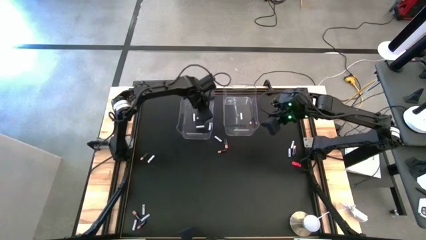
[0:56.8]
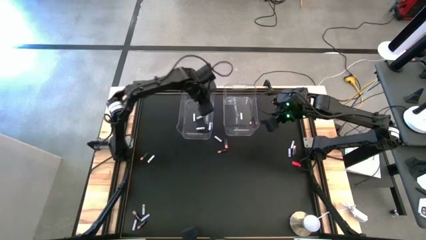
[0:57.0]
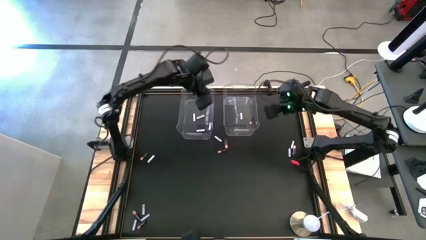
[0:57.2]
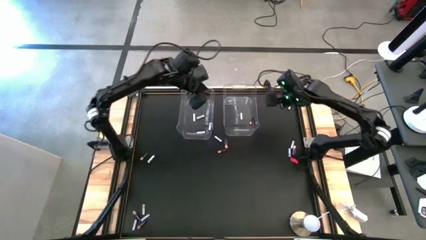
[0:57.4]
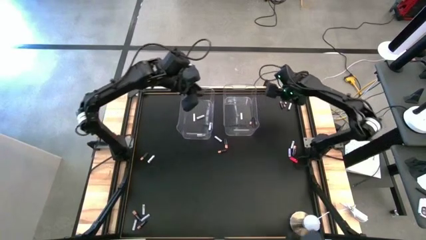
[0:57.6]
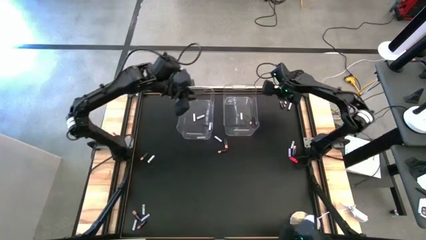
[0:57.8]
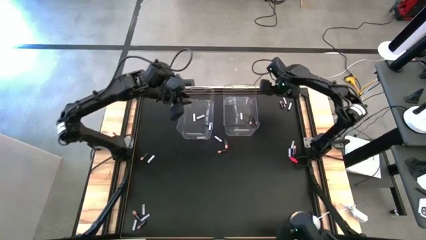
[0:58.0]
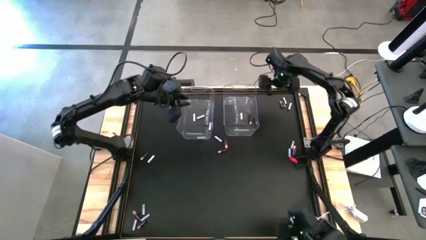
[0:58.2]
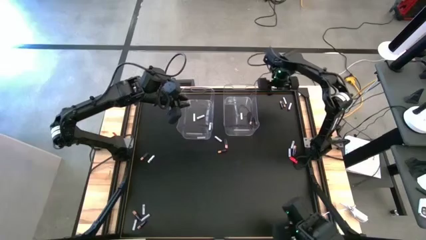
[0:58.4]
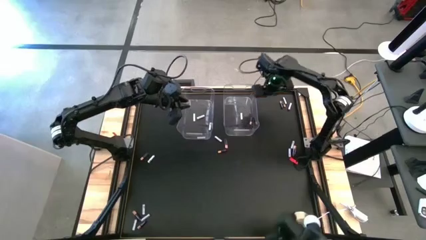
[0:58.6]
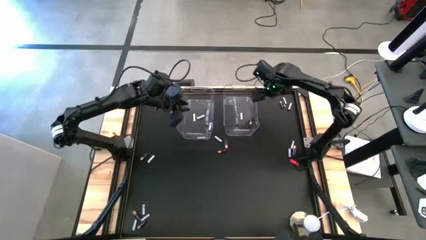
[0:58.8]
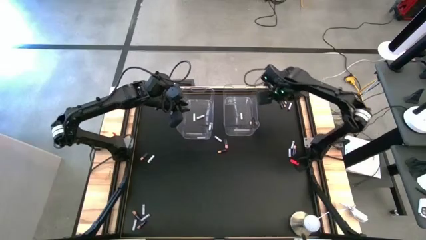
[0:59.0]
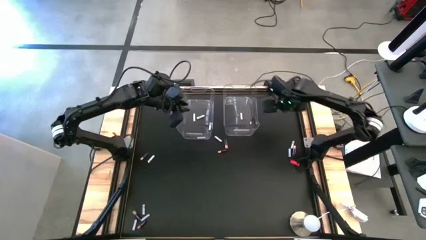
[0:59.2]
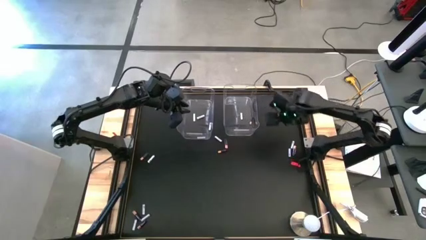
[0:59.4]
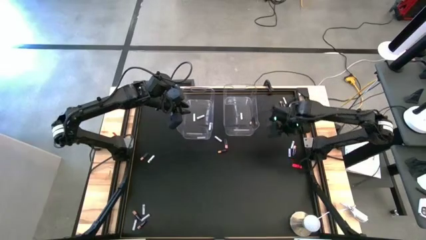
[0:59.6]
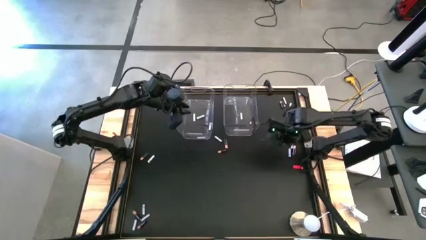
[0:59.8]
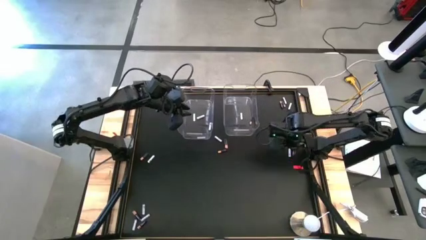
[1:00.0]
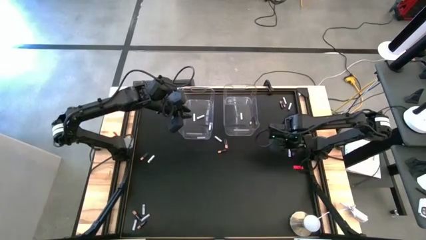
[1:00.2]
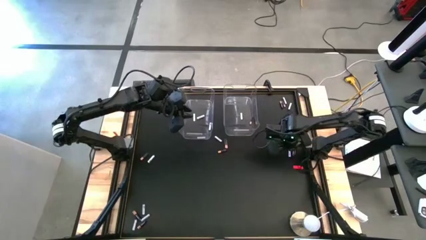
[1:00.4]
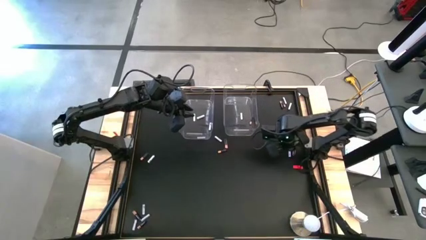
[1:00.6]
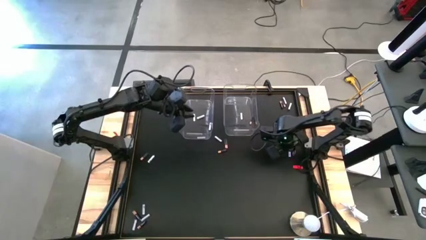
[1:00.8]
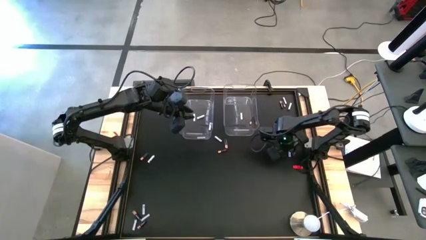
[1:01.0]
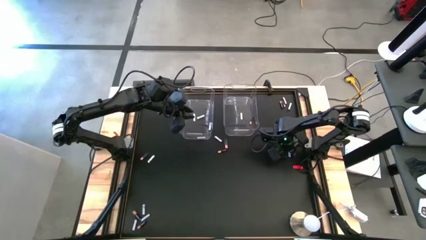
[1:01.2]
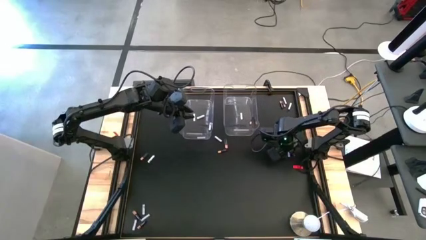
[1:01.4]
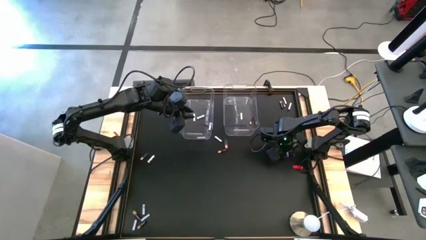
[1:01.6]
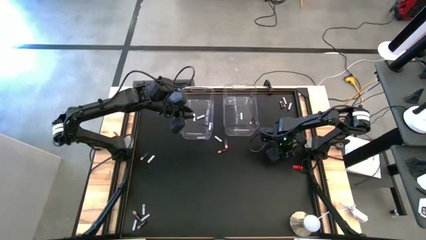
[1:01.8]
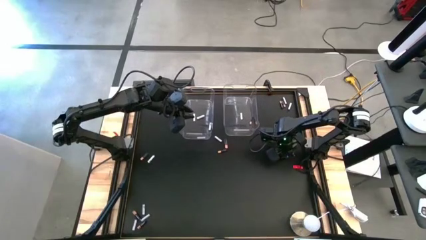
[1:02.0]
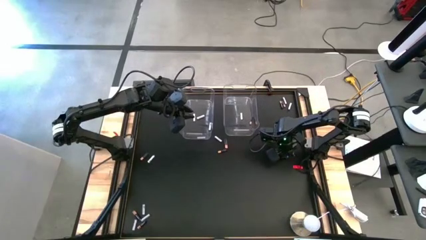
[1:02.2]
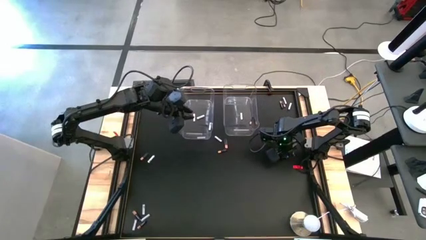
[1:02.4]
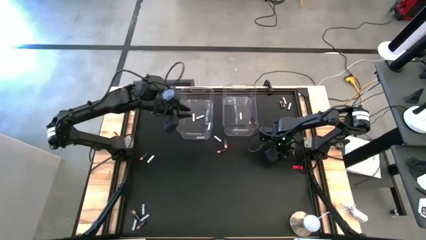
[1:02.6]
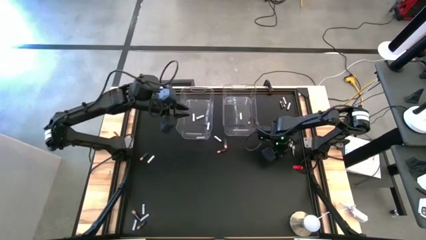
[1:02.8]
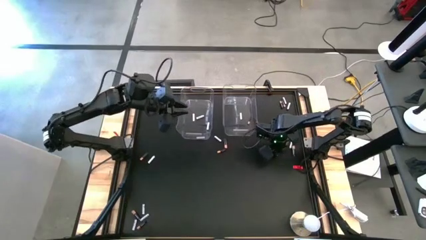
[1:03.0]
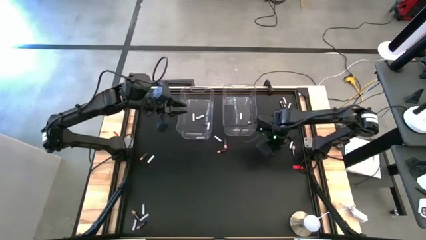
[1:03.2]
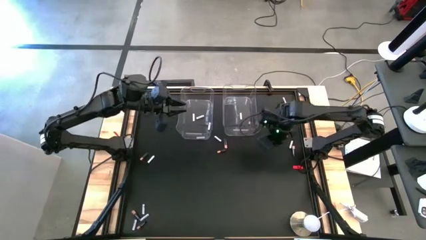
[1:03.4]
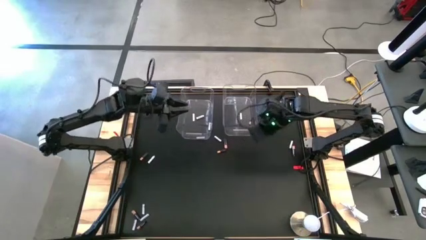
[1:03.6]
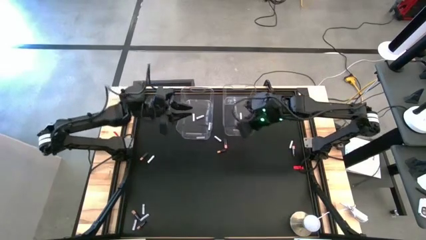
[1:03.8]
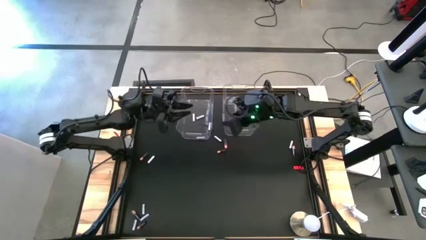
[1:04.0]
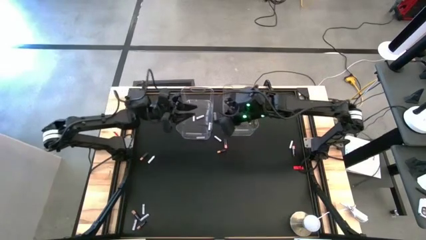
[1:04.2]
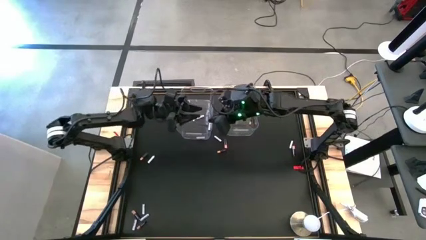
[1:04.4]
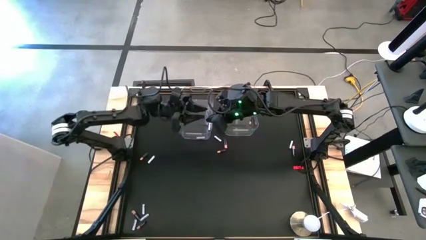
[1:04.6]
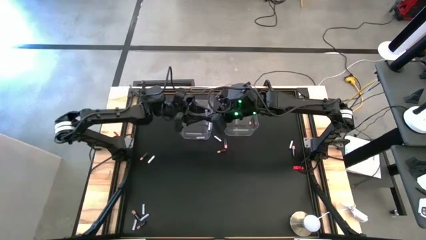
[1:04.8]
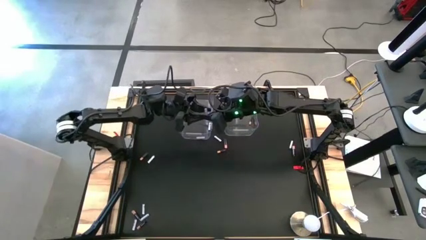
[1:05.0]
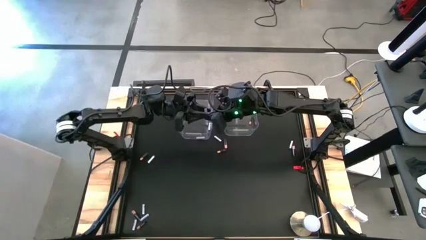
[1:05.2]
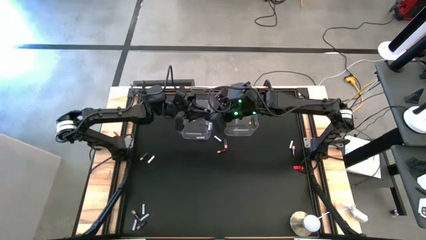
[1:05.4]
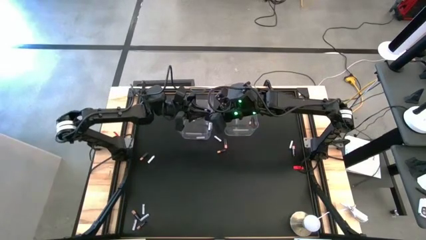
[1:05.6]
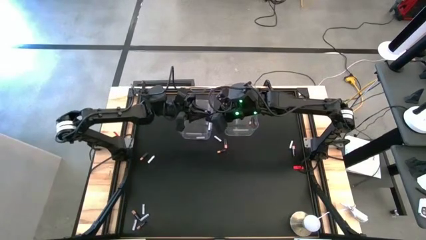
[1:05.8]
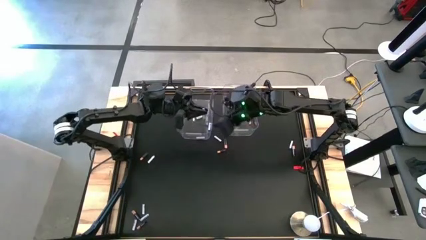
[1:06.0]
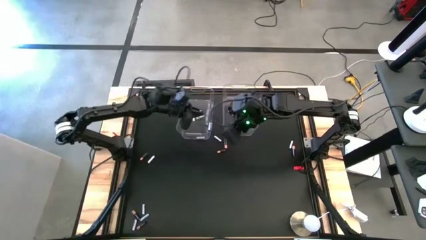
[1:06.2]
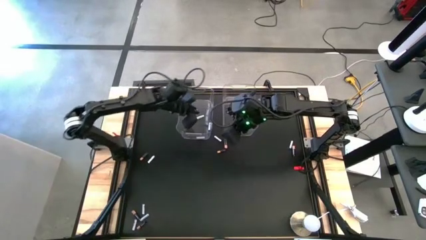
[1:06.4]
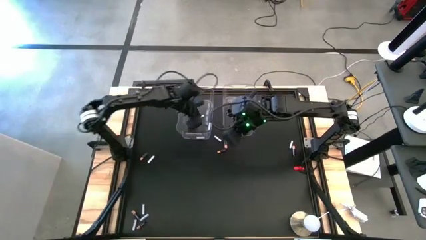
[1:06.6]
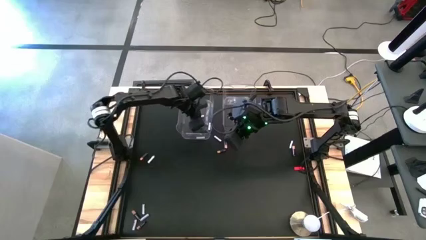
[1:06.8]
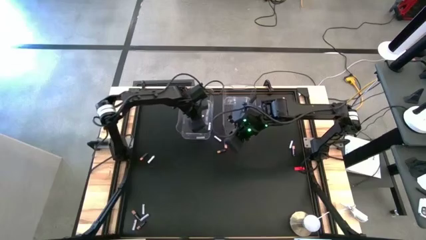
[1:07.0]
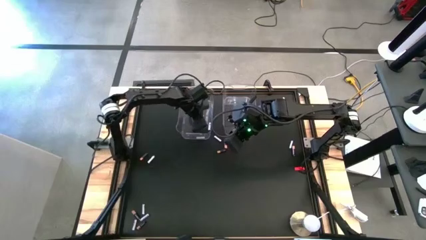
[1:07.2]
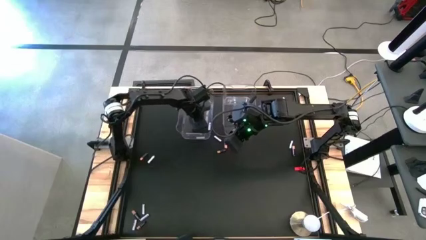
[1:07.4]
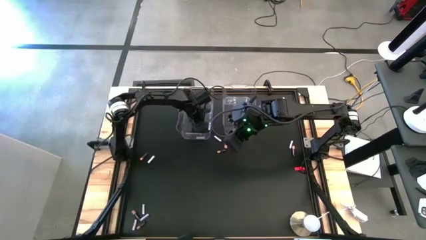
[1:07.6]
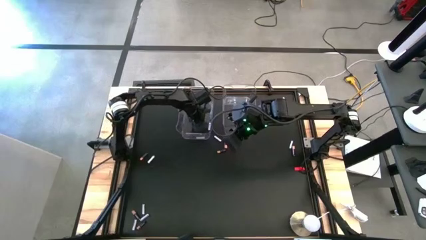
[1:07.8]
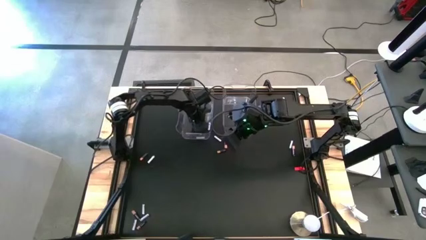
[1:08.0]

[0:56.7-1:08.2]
Task: Sort batteries
Put the white battery into the left transparent bin

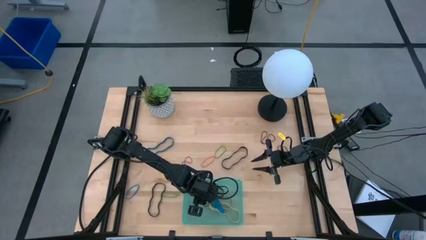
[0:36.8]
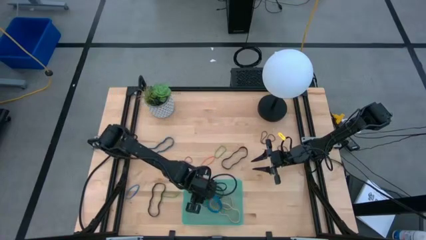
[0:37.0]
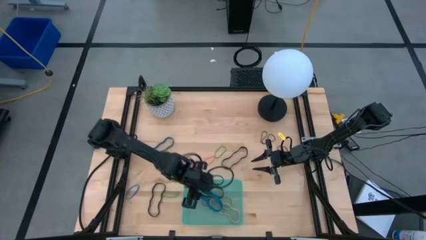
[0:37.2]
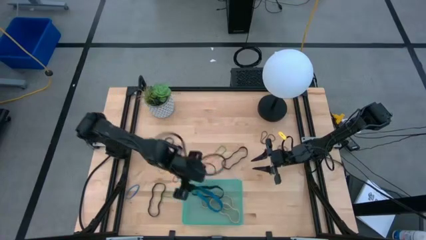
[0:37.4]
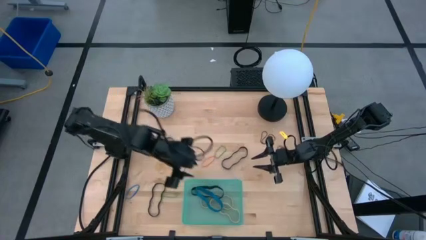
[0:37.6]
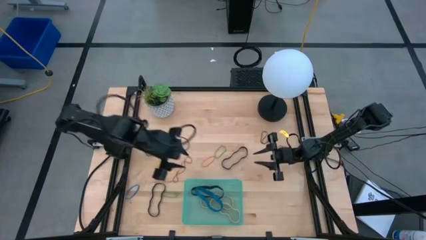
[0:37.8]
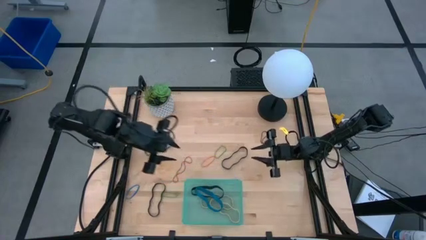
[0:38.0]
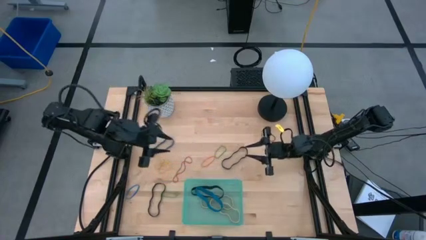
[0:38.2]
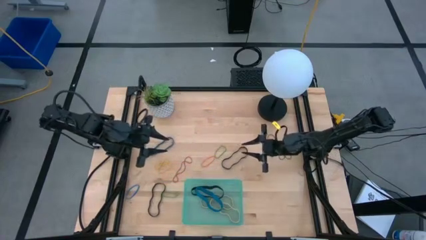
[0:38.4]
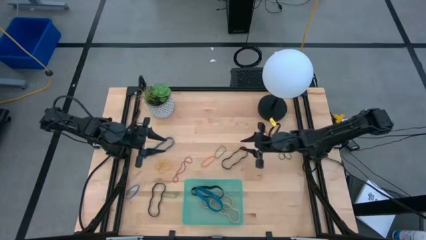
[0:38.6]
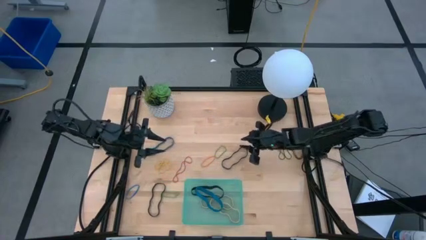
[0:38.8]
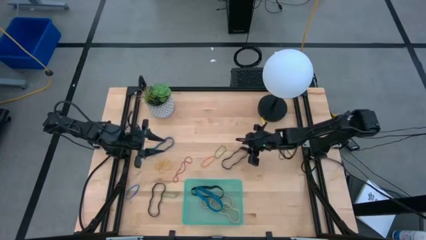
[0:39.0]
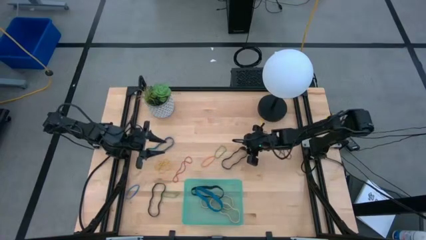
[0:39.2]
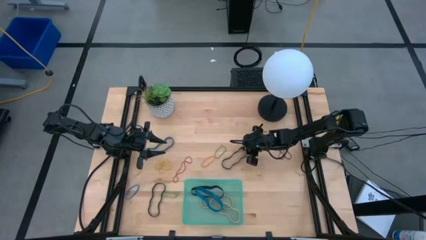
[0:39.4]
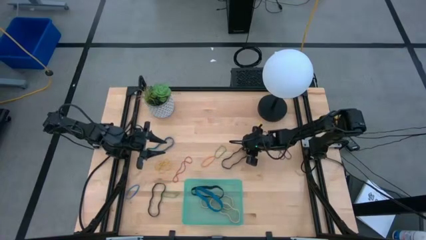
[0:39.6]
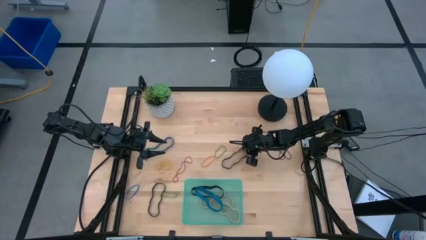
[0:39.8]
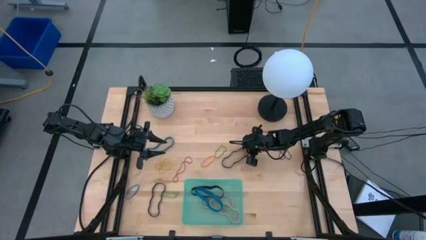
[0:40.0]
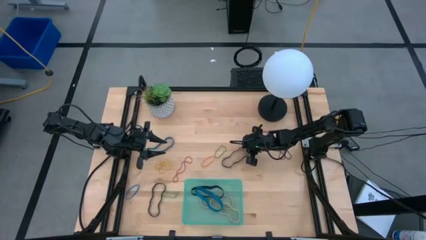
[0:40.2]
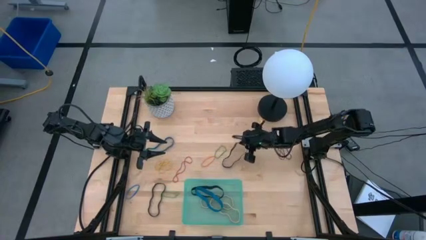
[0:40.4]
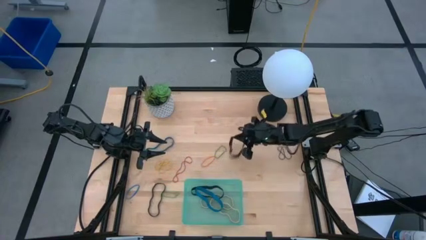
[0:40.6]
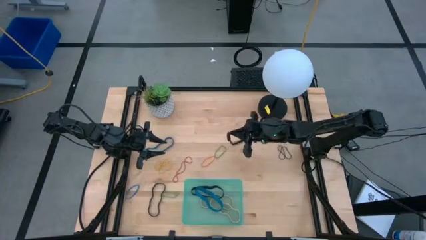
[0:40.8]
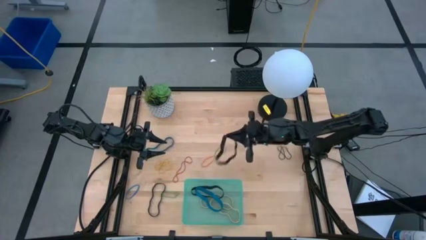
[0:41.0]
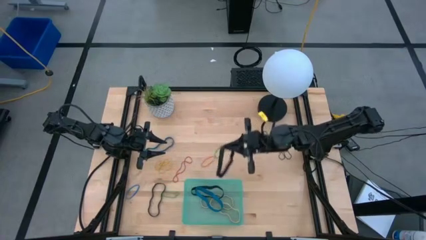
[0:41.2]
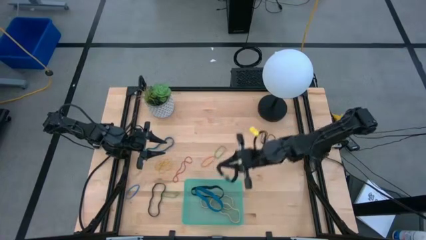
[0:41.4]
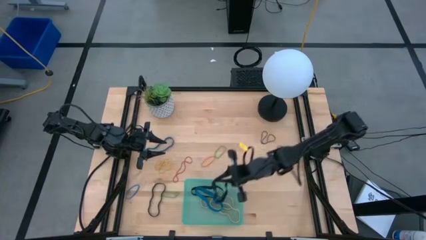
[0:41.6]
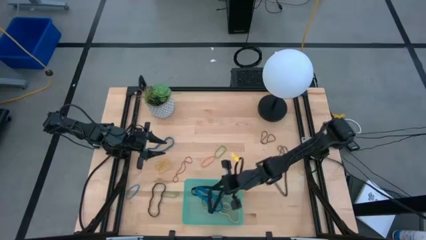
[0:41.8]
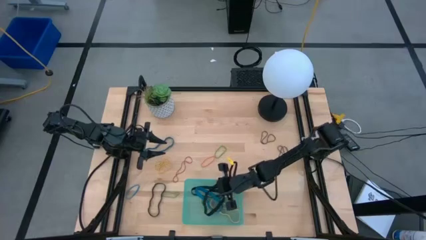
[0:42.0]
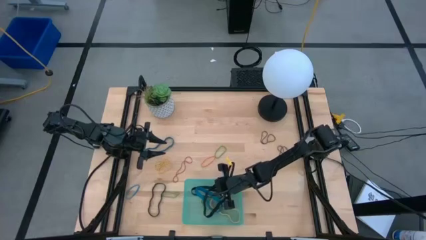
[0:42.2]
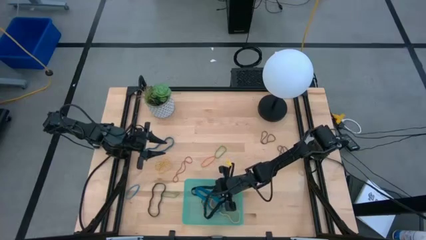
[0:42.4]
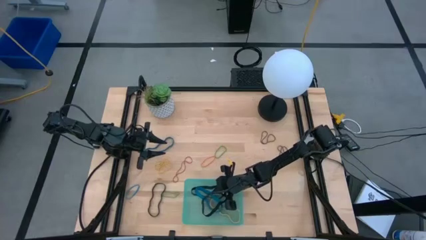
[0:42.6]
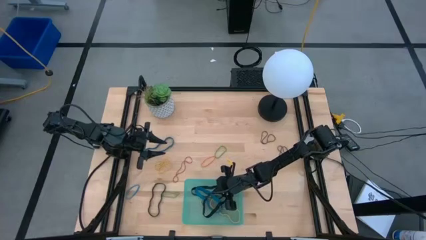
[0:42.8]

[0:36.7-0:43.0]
Task: Pick and place rubber bands into bin
Put the top large black rubberband into the green bin
